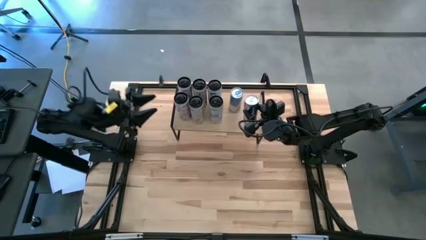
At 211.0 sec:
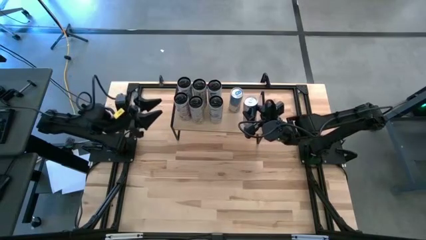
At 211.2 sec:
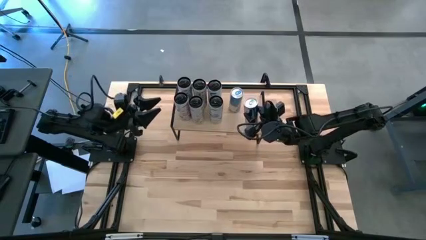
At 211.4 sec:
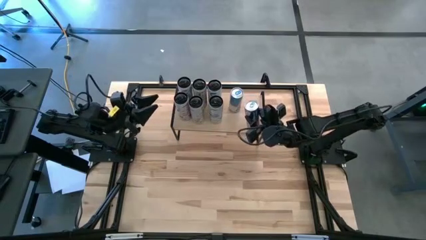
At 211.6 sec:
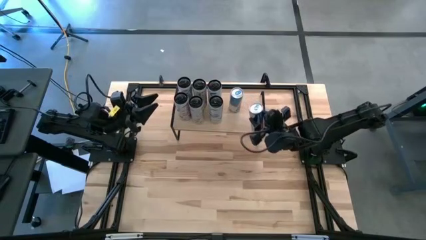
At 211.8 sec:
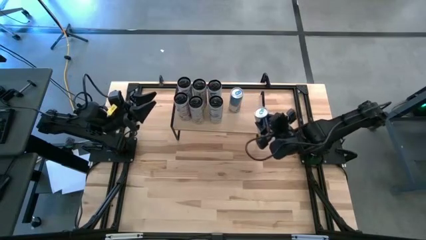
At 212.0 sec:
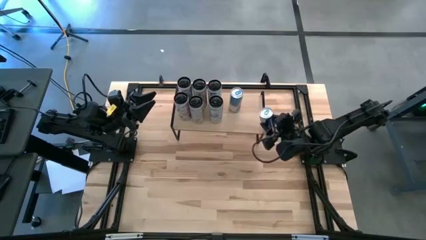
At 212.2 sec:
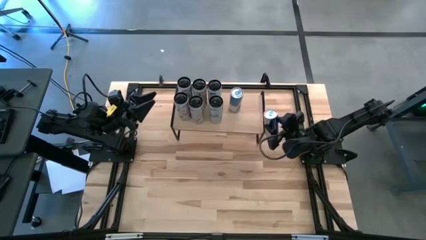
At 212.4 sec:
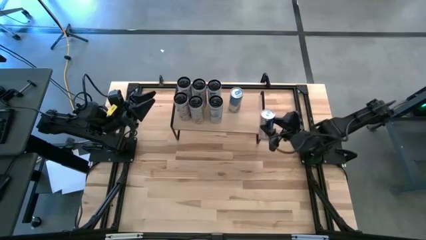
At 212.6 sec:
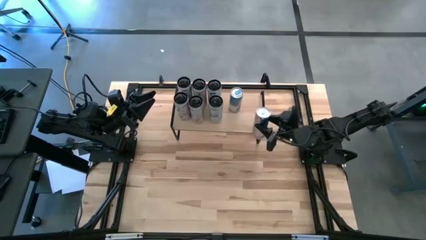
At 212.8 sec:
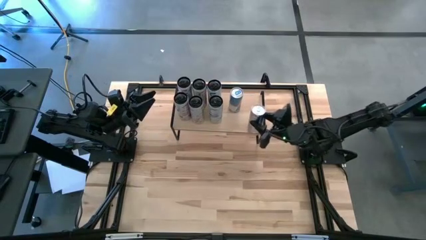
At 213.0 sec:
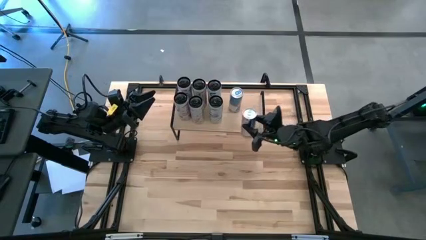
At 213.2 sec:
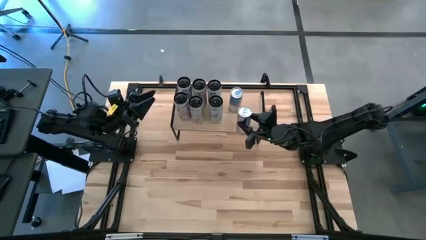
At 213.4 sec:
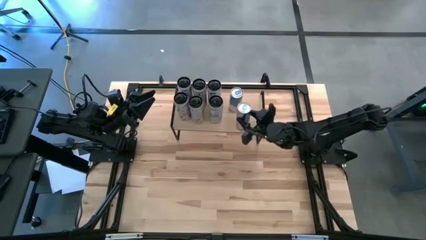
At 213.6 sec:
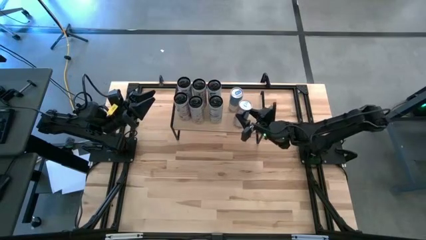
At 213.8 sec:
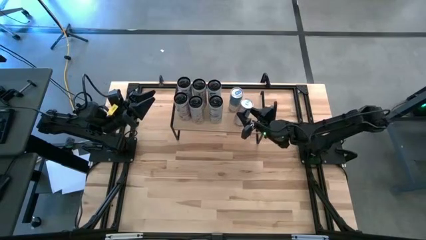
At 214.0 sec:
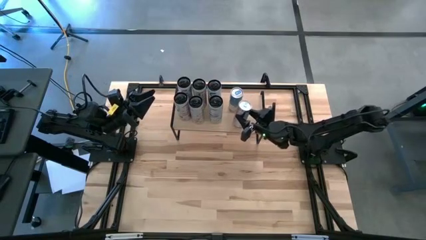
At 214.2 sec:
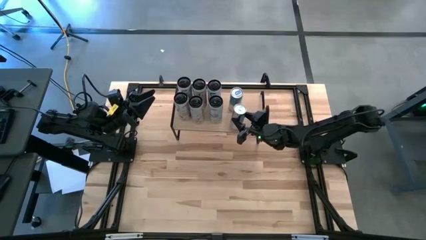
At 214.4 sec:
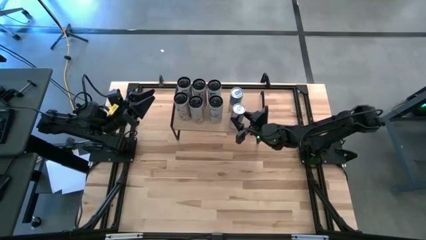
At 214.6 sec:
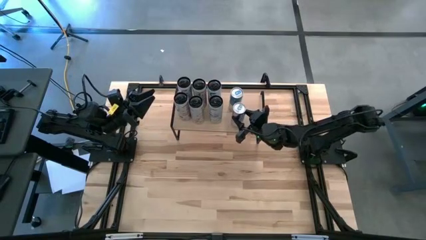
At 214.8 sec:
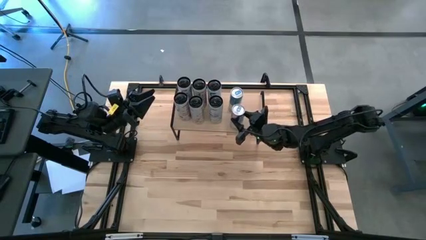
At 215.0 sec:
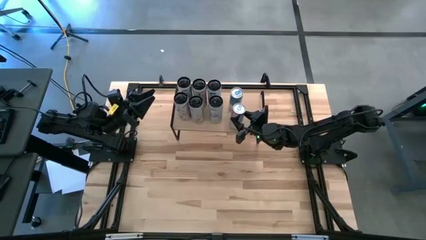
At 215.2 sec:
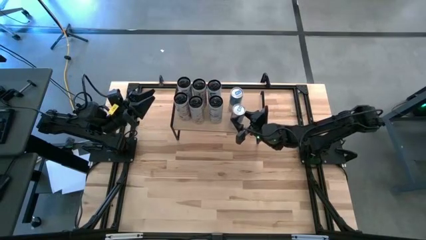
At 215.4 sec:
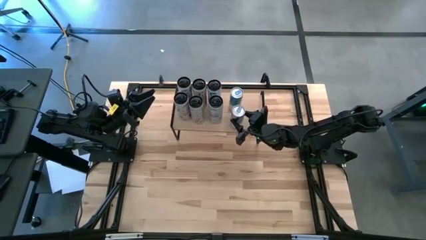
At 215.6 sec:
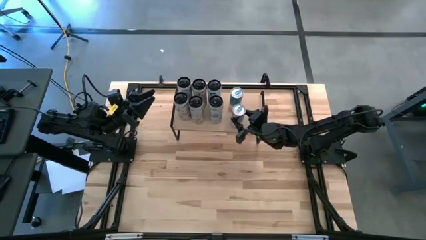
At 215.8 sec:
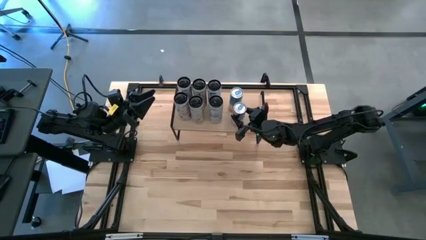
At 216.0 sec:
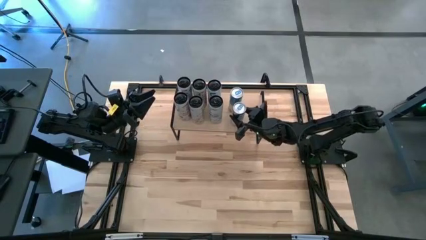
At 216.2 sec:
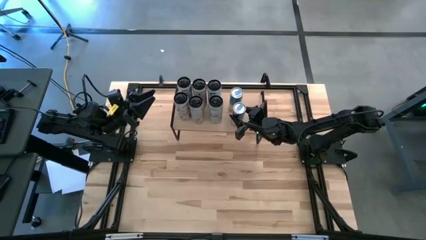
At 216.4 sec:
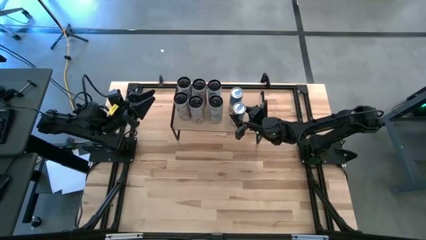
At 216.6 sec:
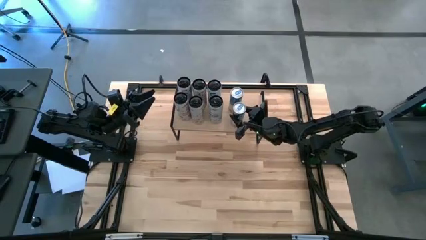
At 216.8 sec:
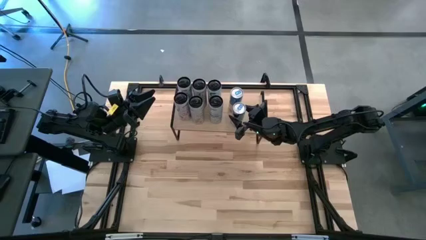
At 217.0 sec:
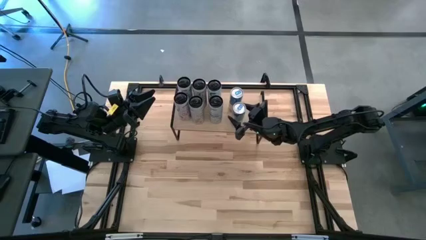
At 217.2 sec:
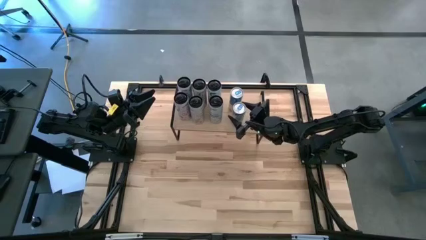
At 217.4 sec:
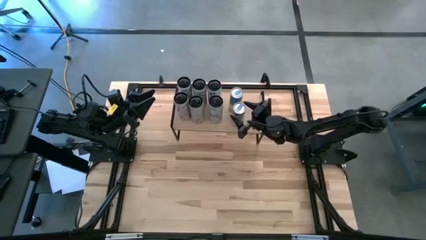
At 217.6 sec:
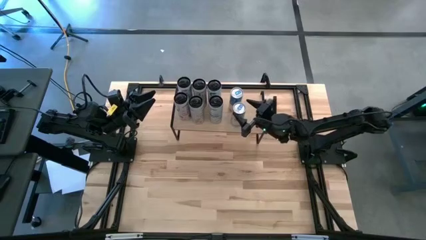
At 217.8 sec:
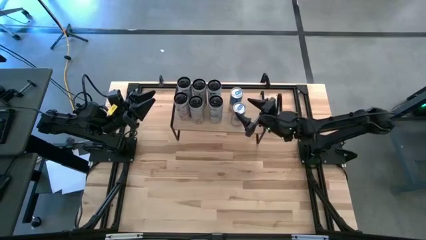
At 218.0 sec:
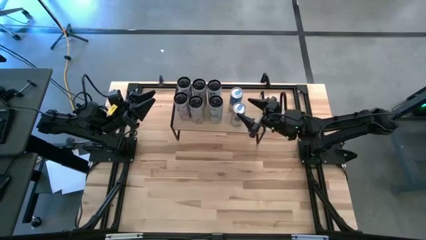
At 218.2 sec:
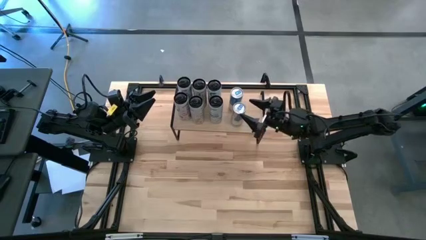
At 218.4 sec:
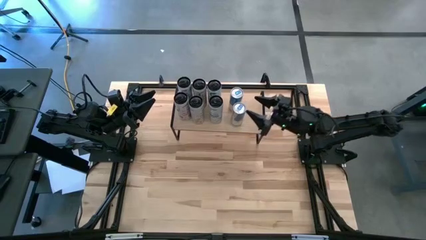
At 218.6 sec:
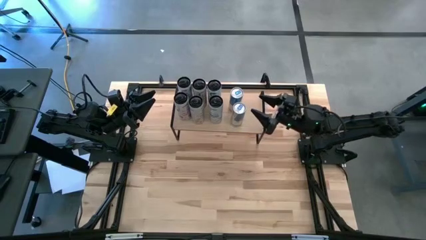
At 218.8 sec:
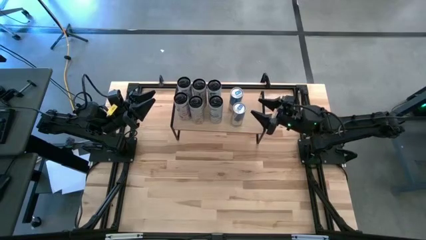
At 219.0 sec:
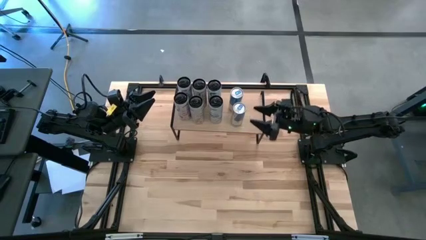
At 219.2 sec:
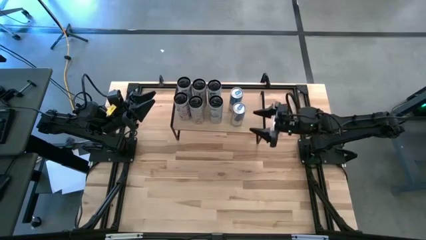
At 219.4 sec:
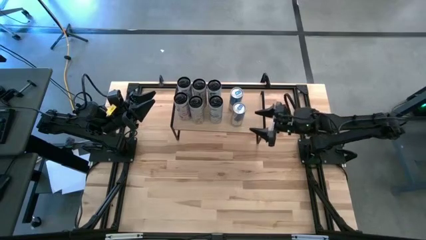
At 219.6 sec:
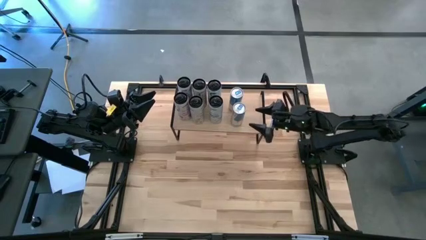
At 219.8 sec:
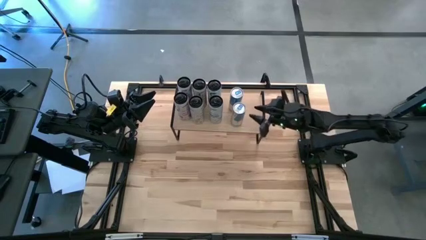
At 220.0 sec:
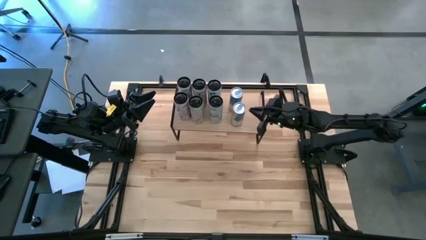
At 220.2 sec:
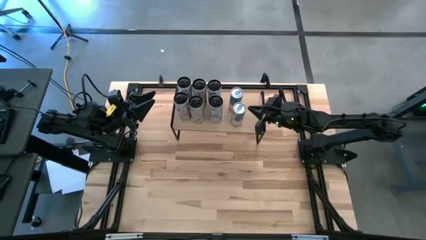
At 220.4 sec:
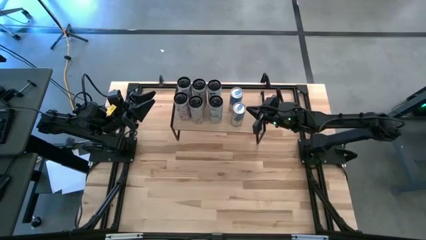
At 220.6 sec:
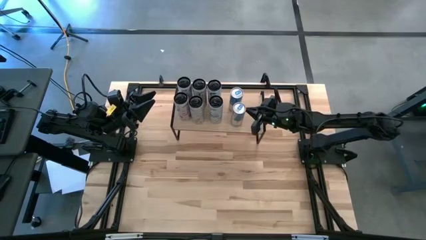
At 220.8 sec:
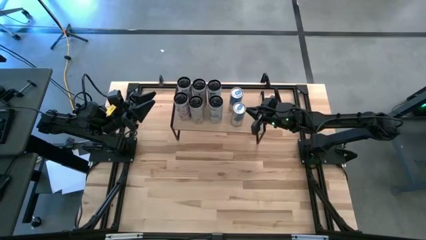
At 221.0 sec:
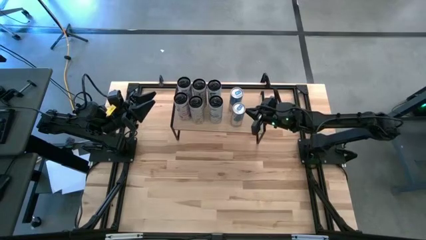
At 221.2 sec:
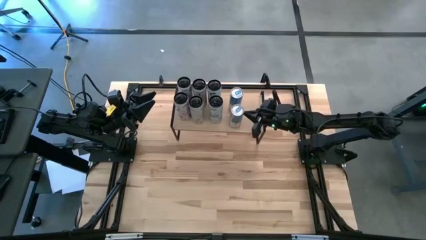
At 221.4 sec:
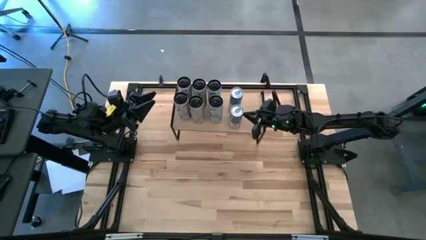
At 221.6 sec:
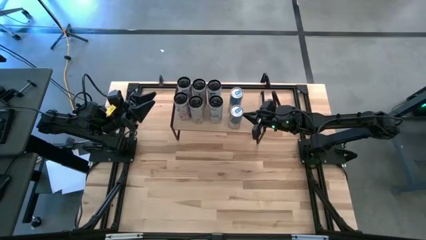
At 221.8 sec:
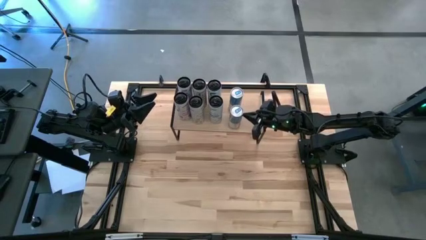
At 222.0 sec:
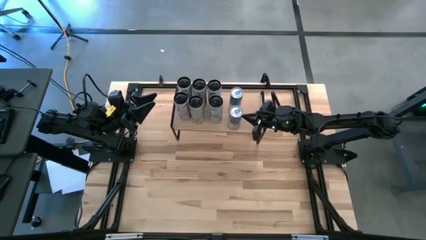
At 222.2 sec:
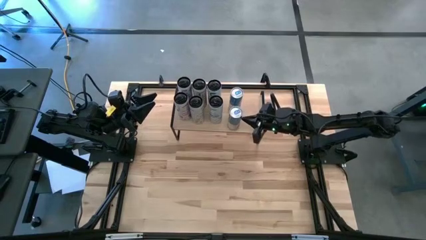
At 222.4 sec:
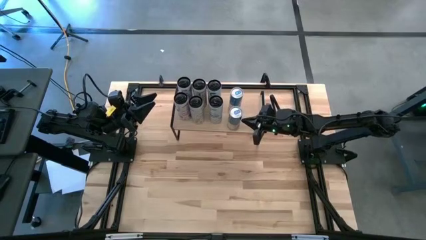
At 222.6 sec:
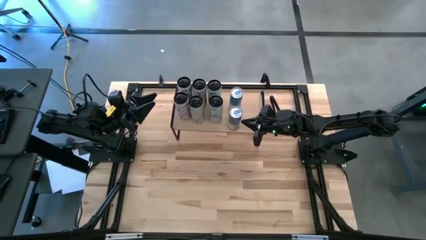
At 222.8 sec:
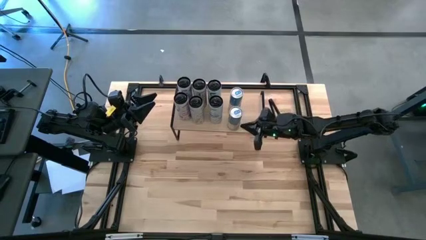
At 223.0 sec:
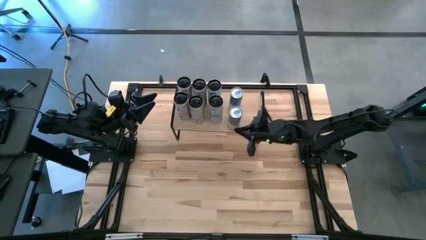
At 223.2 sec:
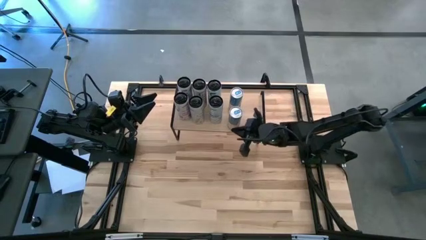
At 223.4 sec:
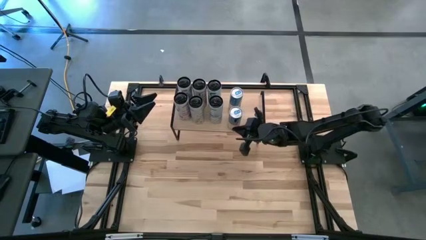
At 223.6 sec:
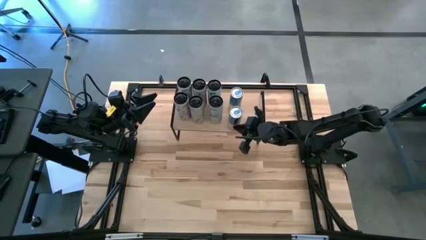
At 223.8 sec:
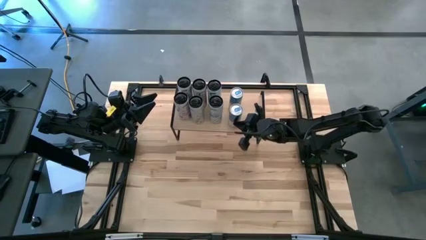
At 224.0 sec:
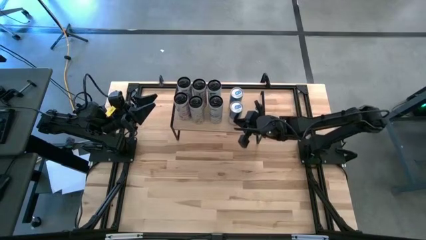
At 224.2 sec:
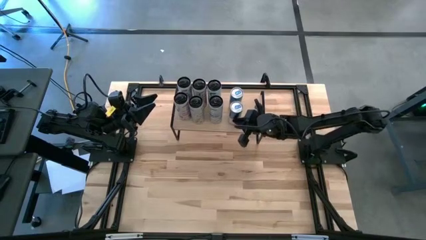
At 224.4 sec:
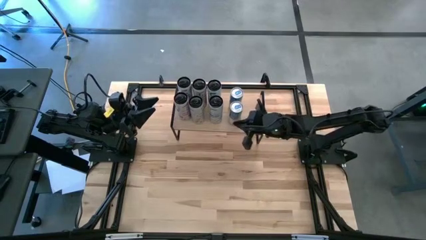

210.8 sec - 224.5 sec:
Task: Place canned beverage on shelf
Put the blue soda can on the shelf aligned with the other blue soda can

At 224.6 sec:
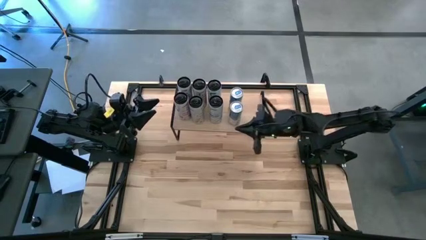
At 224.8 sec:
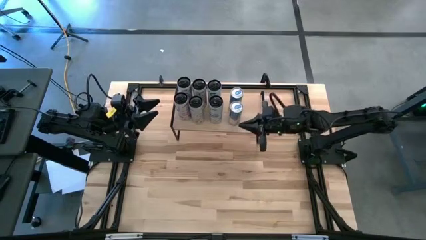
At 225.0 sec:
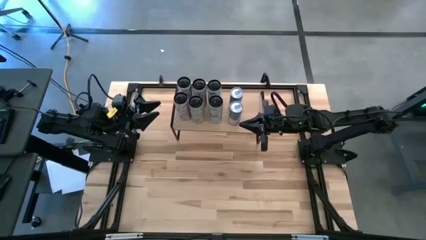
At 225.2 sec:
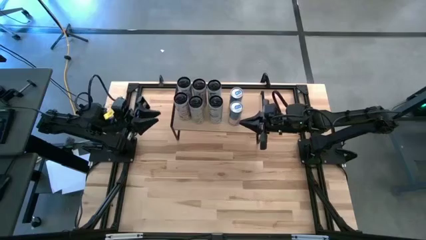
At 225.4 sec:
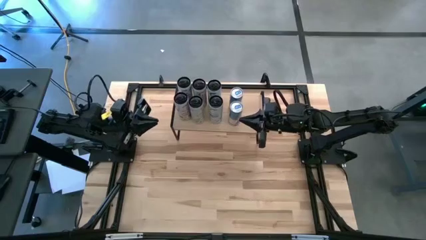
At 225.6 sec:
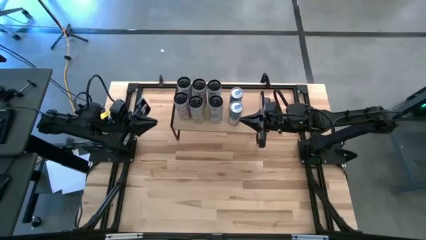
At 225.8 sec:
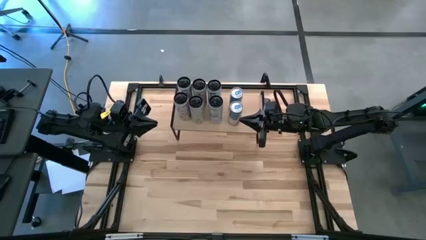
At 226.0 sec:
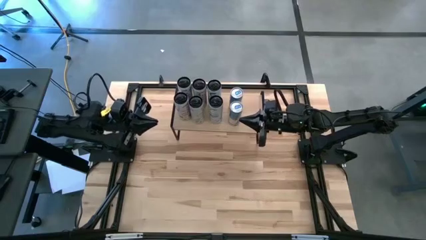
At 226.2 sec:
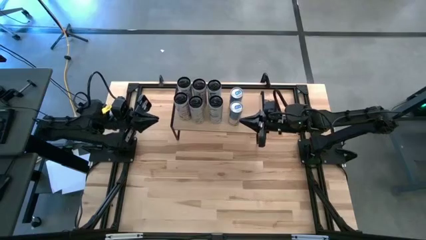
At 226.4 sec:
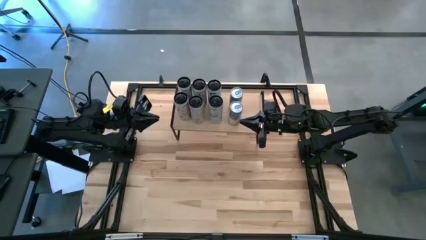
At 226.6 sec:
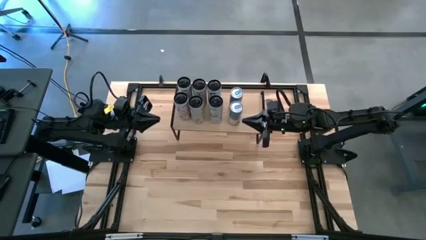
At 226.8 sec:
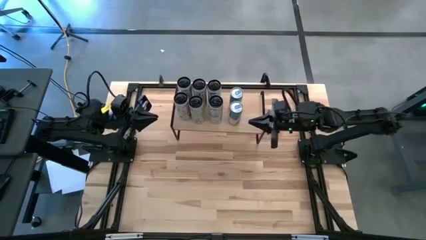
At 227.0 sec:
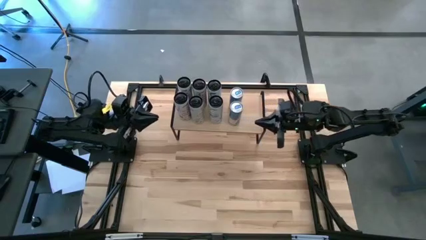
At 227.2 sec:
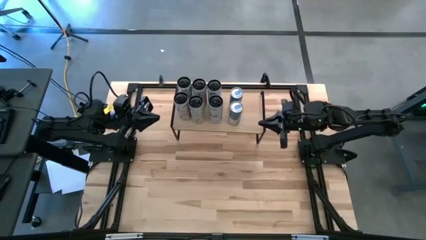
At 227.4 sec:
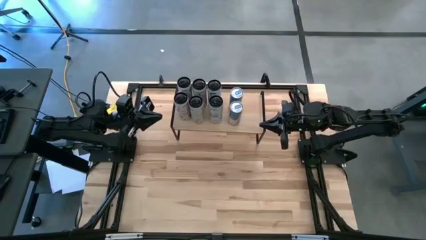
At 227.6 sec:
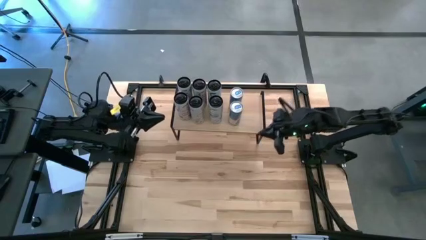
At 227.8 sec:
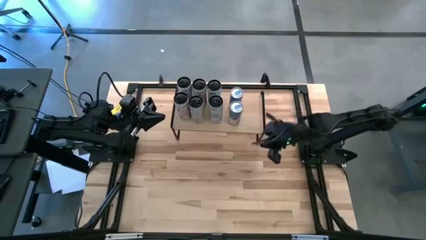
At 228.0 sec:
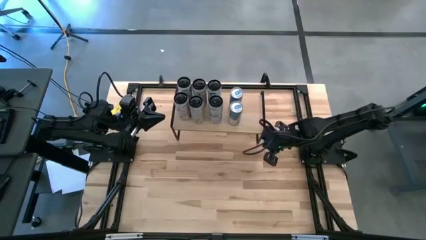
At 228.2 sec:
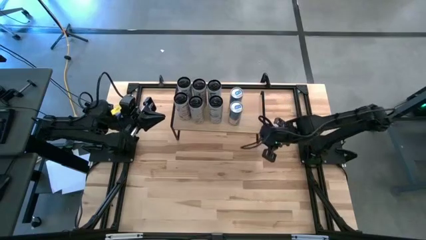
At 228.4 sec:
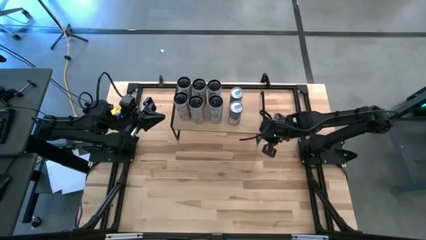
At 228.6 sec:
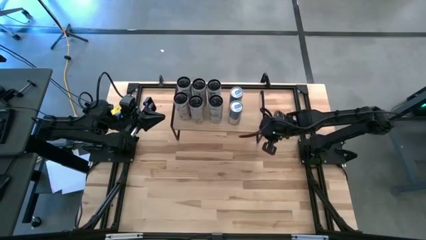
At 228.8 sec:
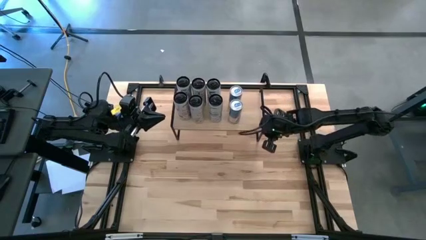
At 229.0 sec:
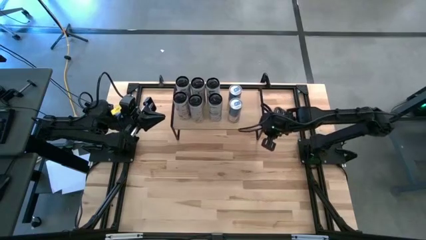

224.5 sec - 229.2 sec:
Adjust the shelf
